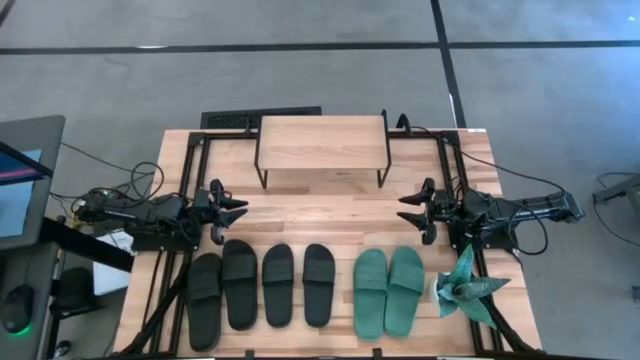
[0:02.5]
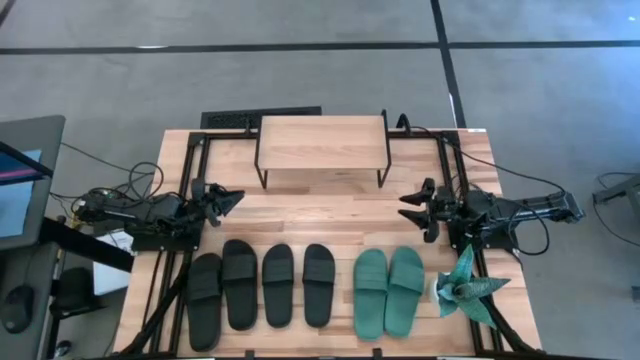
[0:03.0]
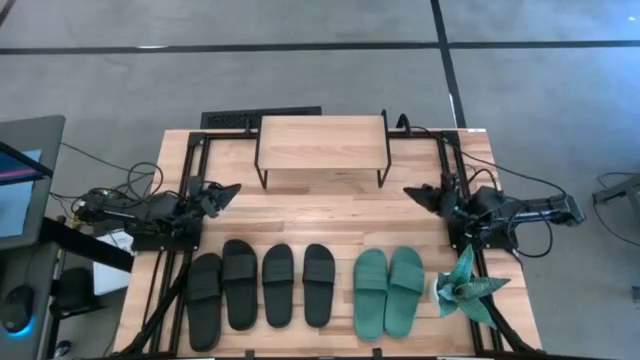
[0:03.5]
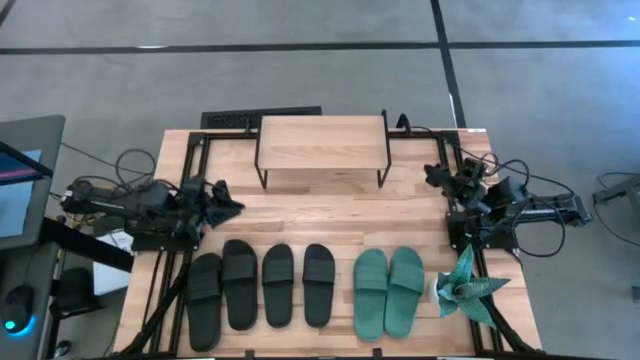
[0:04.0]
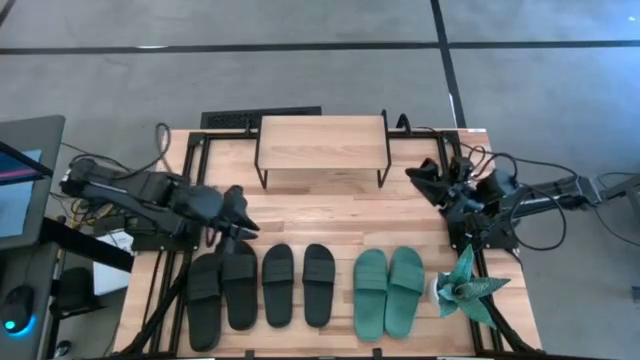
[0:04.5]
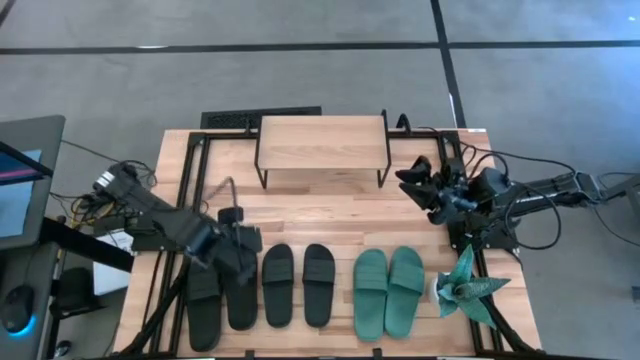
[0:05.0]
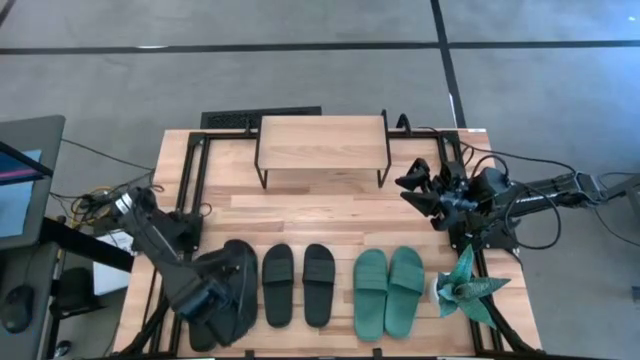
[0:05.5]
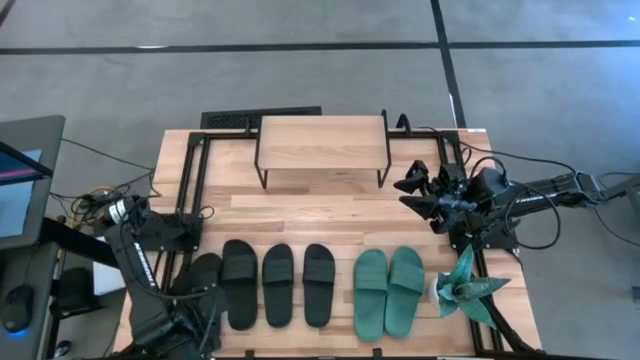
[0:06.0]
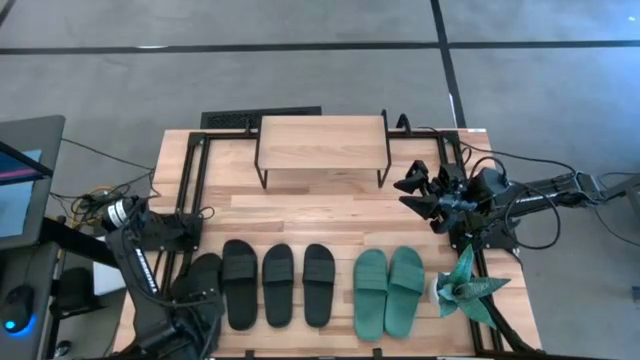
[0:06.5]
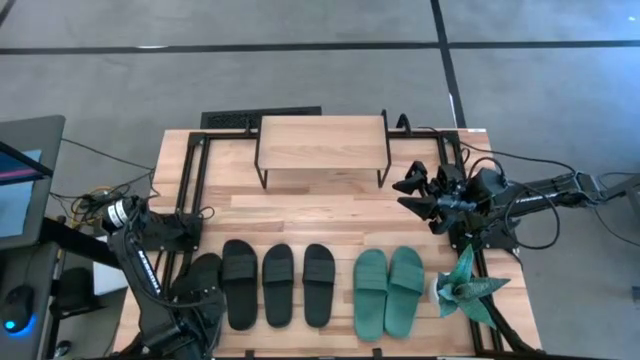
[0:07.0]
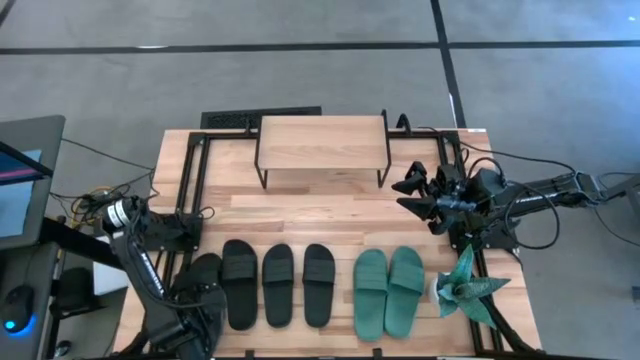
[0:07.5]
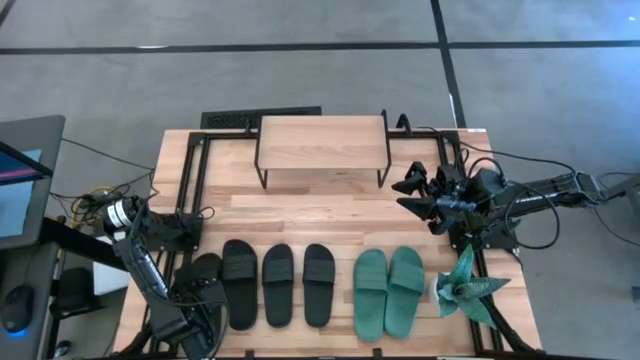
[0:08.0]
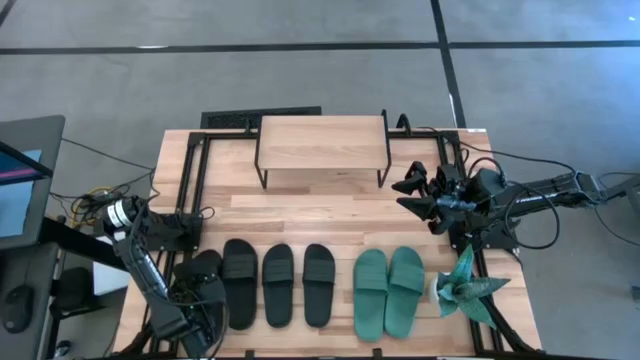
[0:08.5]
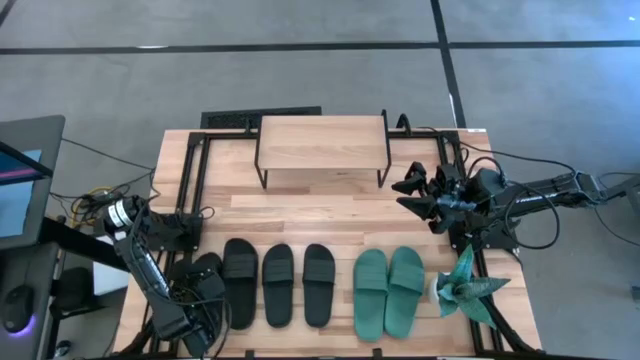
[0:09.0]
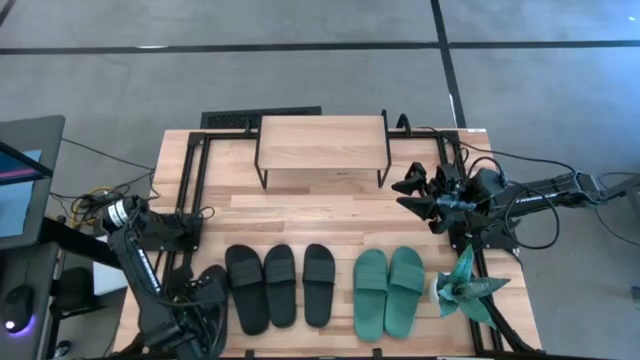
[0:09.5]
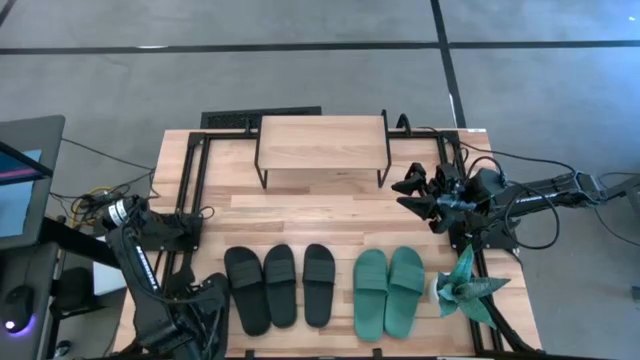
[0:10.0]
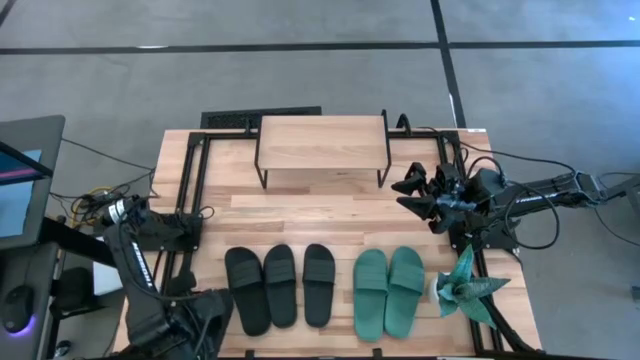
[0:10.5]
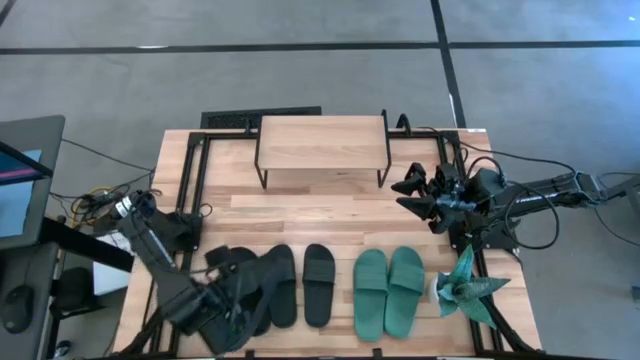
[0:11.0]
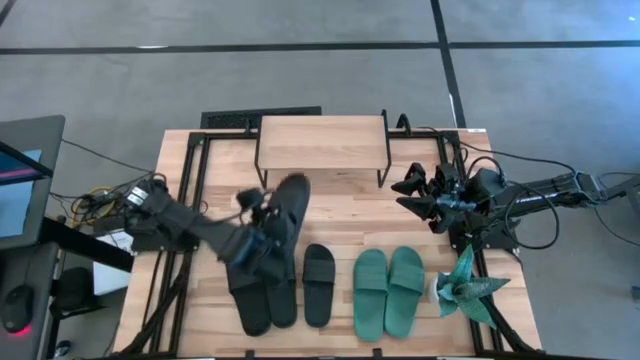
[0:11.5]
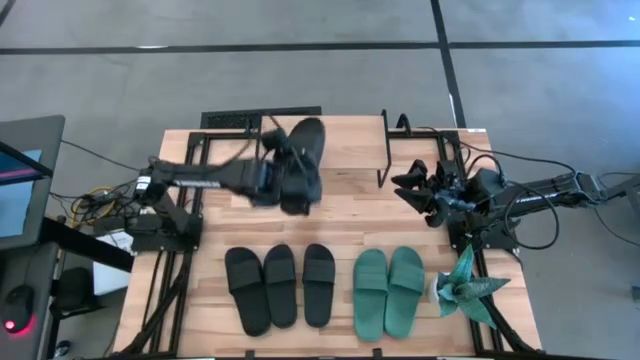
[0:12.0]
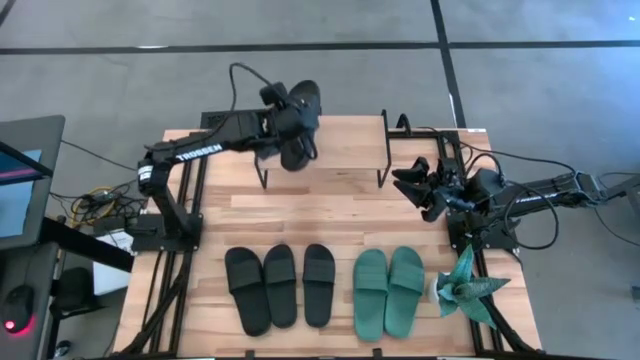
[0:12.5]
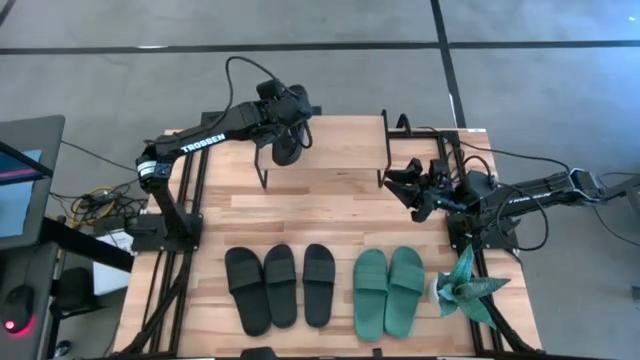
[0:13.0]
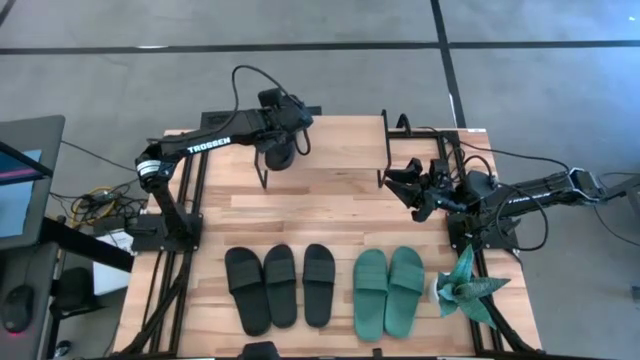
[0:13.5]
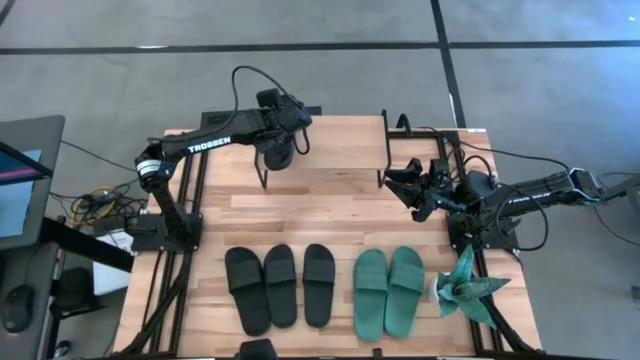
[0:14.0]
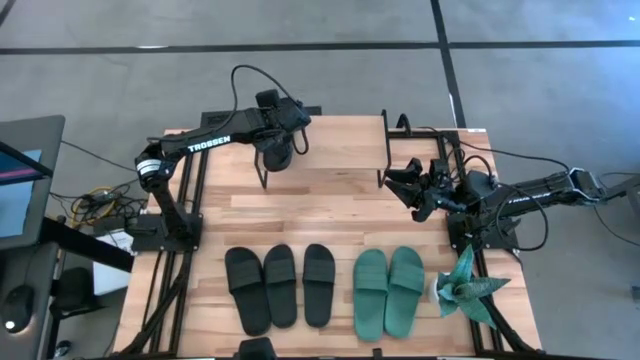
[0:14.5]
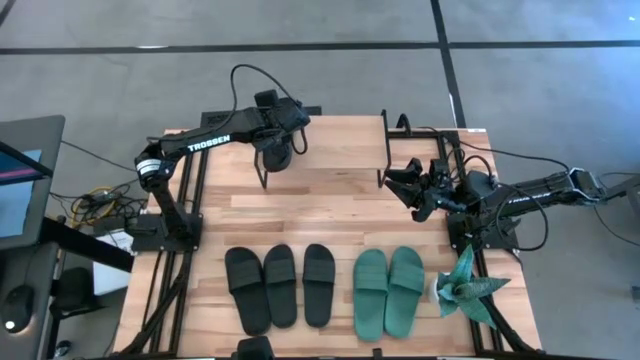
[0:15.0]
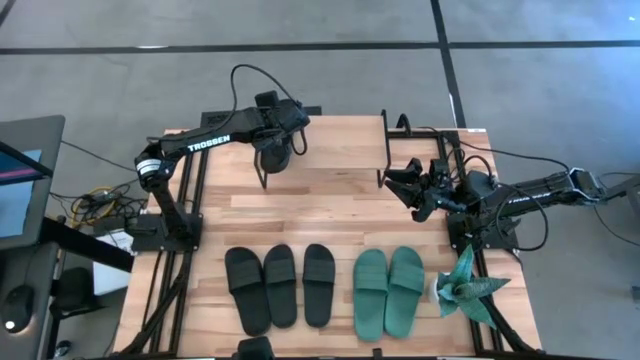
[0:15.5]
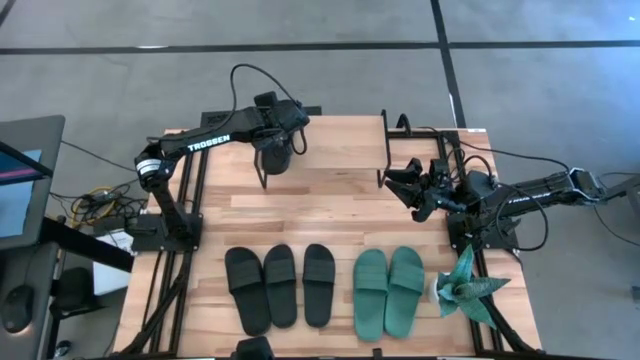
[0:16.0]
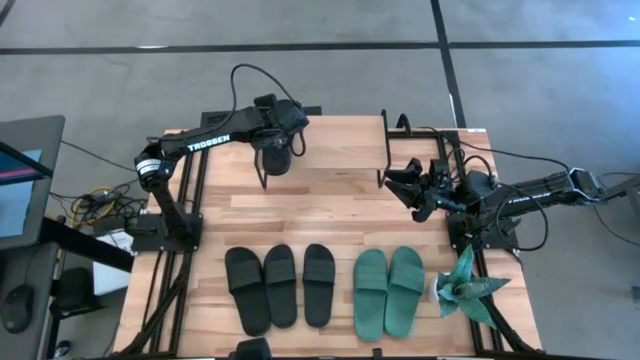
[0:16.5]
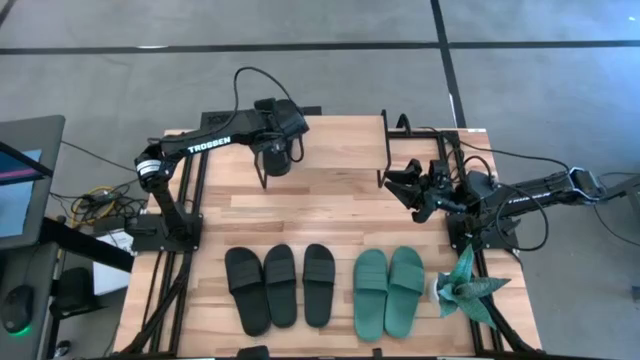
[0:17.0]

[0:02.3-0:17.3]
Task: Pick and place slides into the shelf
Put the black slipper on the shelf

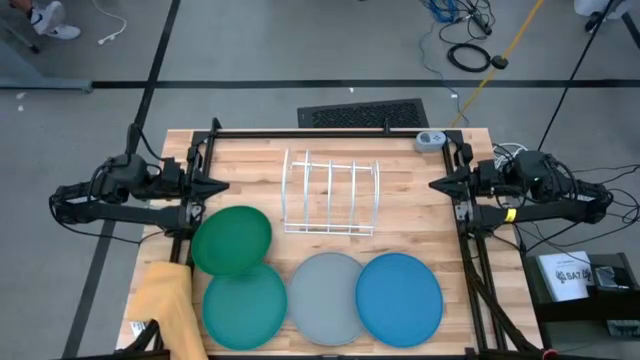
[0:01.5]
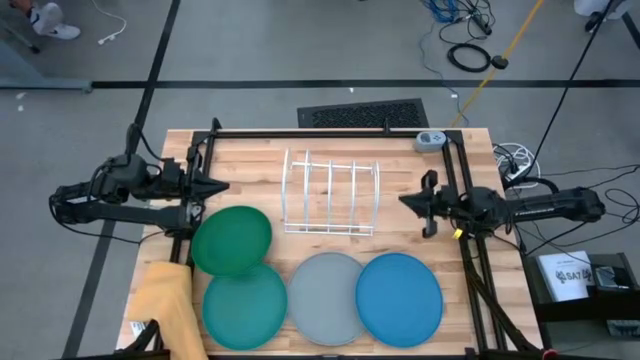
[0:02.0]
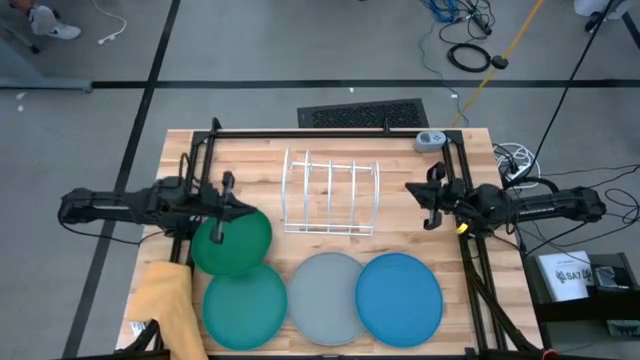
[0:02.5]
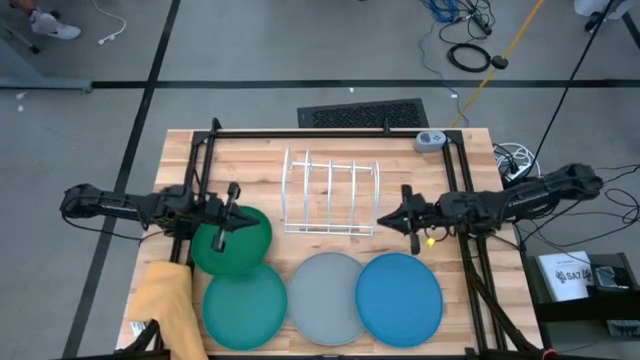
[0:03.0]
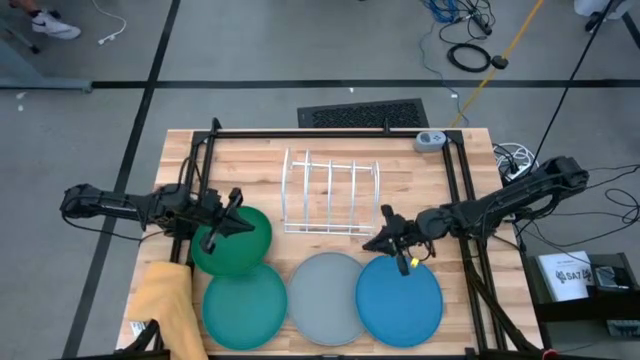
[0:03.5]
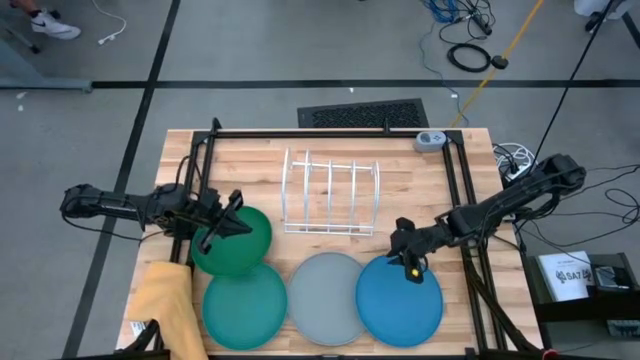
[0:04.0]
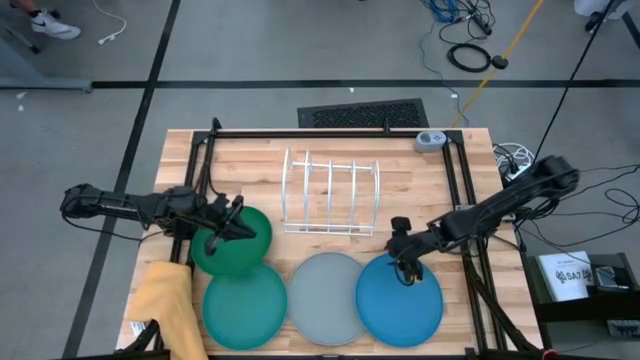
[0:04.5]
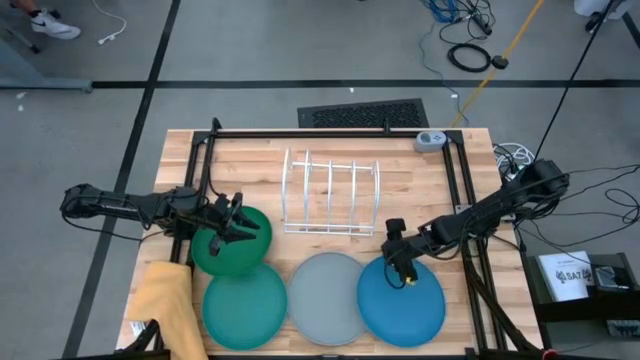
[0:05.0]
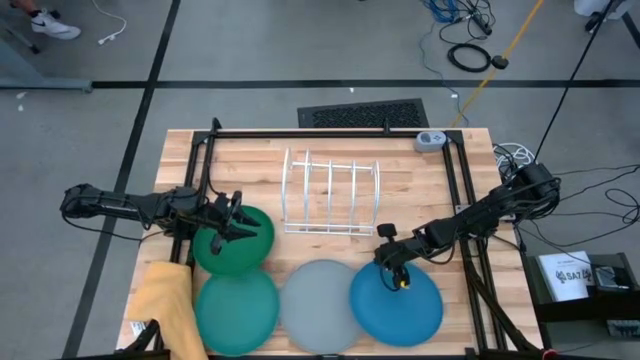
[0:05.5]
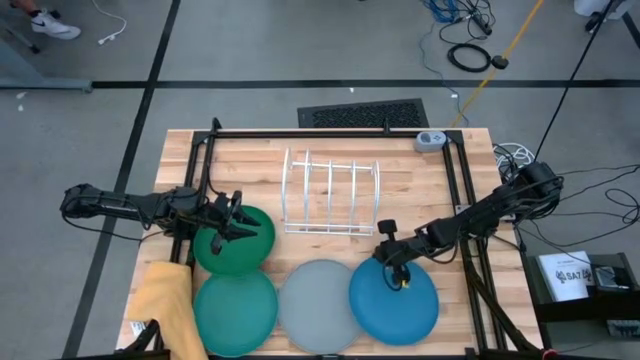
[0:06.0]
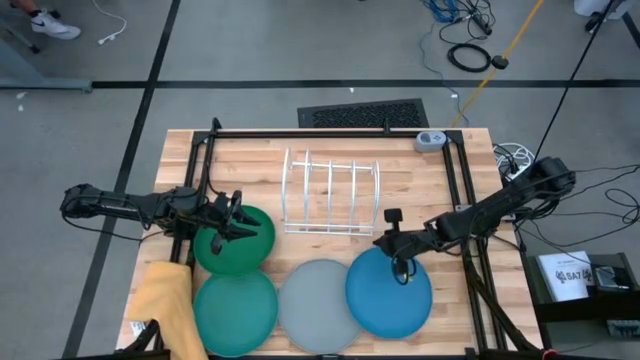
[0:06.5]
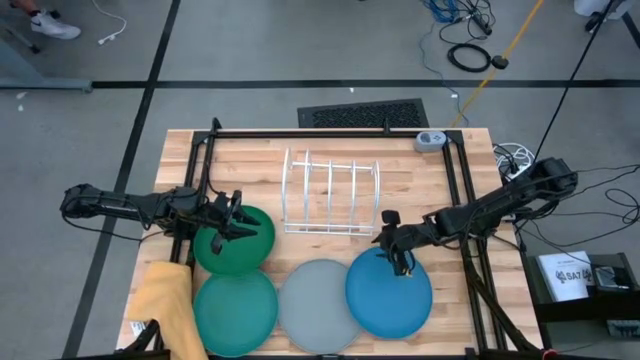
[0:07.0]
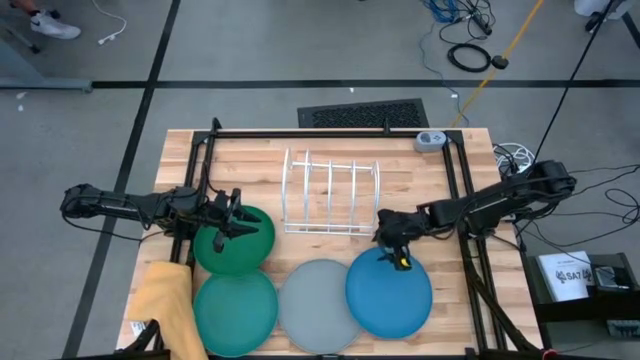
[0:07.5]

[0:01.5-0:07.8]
Task: Sort dishes
Put the blue plate in the dish rack
